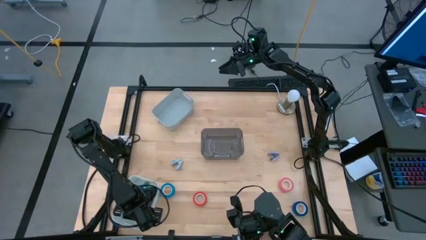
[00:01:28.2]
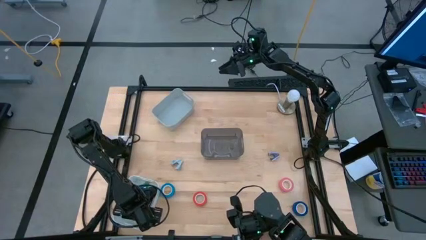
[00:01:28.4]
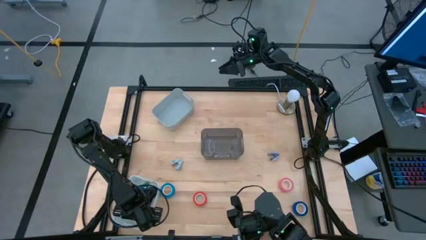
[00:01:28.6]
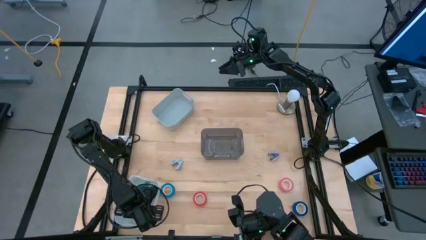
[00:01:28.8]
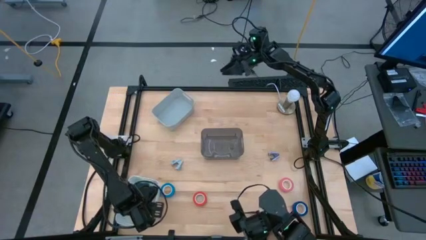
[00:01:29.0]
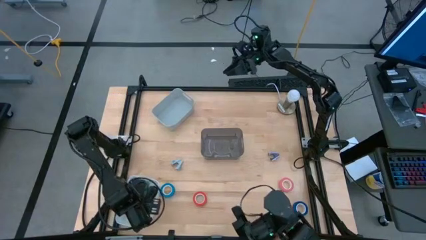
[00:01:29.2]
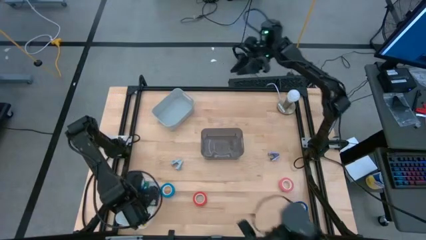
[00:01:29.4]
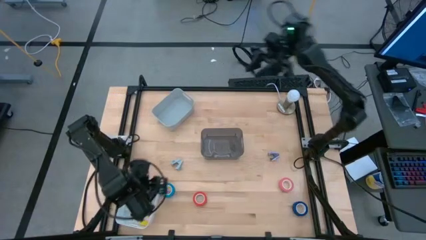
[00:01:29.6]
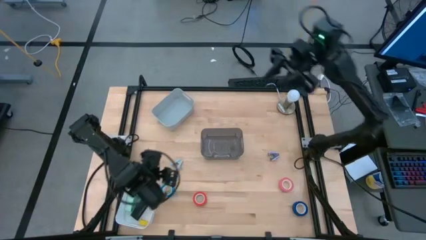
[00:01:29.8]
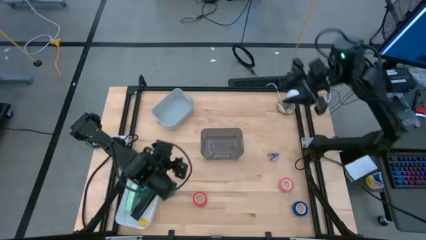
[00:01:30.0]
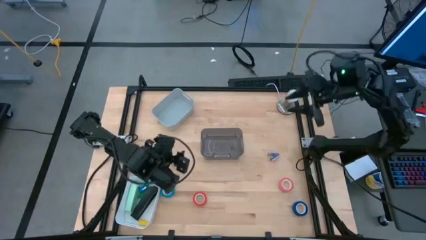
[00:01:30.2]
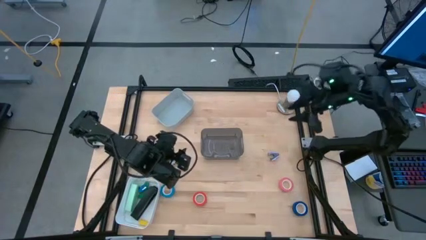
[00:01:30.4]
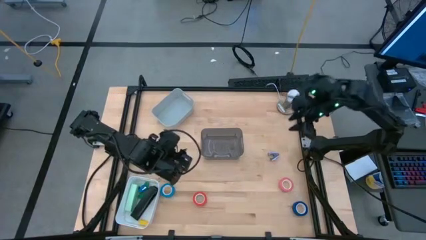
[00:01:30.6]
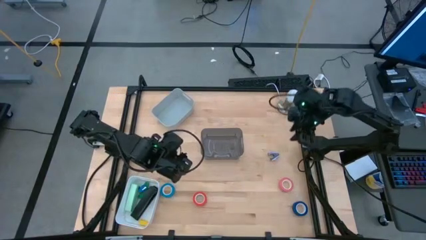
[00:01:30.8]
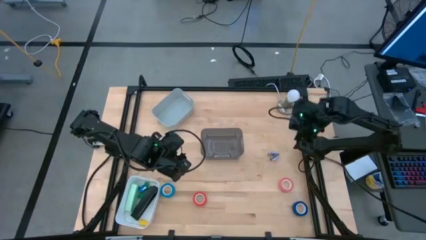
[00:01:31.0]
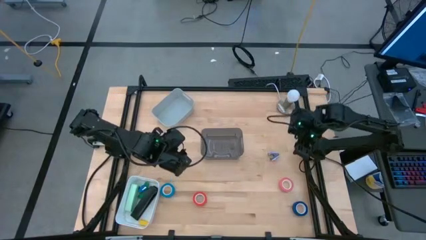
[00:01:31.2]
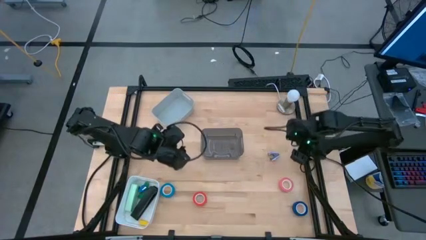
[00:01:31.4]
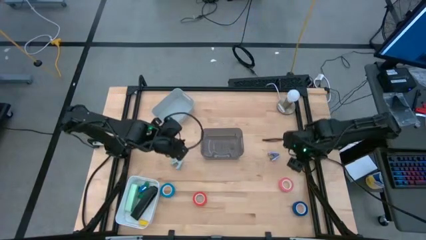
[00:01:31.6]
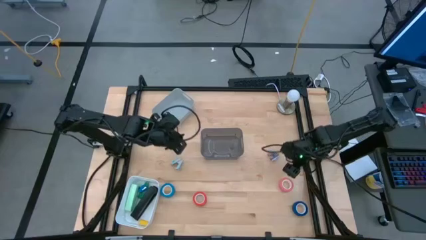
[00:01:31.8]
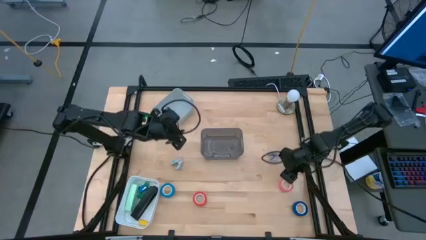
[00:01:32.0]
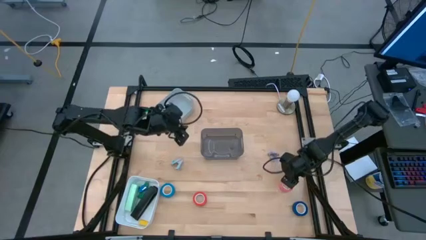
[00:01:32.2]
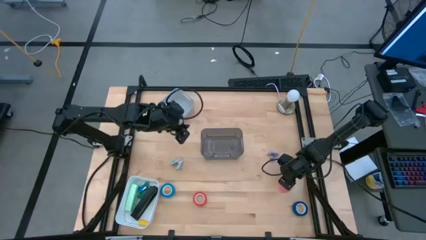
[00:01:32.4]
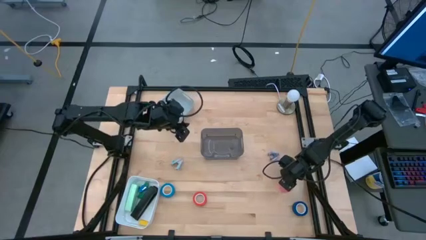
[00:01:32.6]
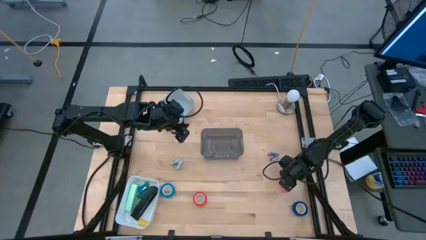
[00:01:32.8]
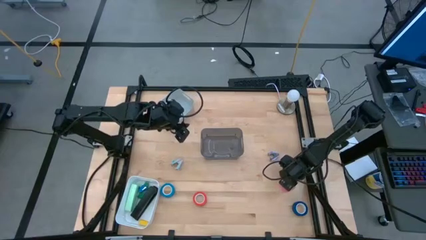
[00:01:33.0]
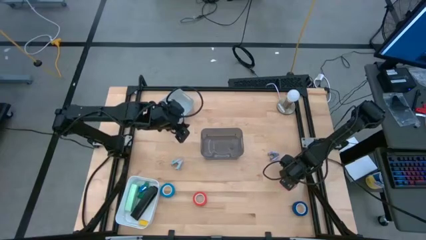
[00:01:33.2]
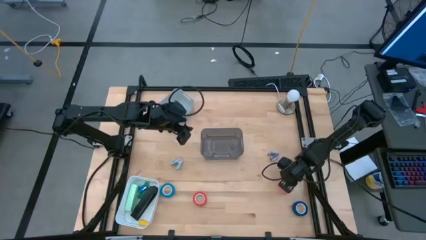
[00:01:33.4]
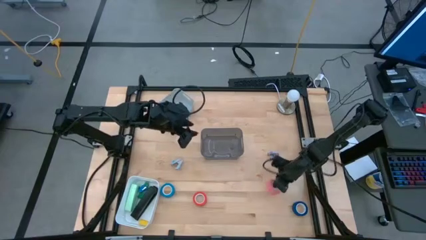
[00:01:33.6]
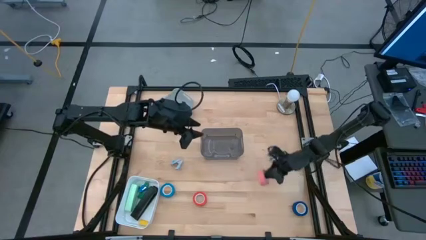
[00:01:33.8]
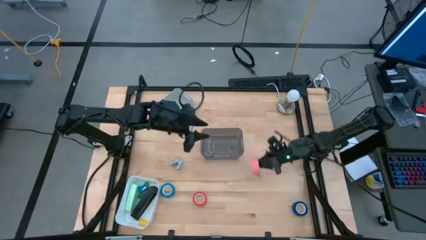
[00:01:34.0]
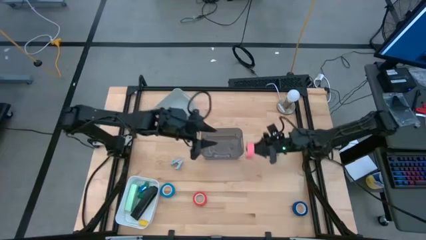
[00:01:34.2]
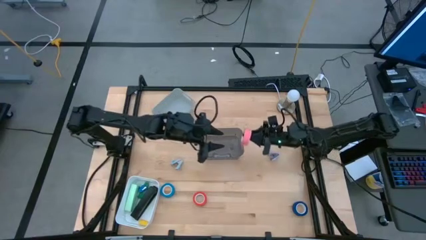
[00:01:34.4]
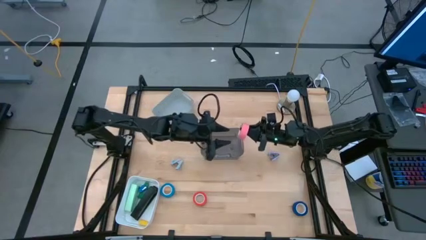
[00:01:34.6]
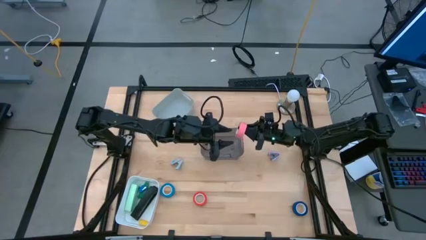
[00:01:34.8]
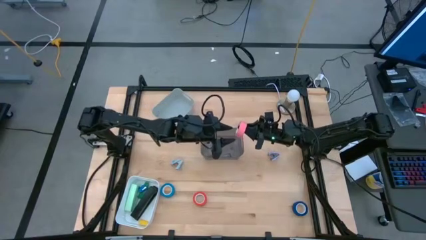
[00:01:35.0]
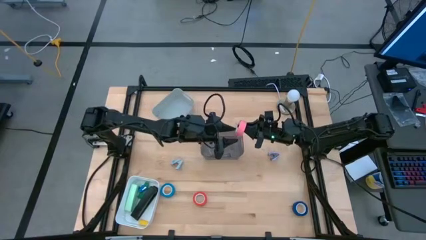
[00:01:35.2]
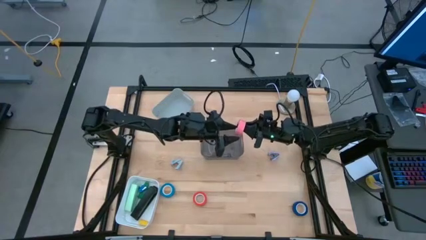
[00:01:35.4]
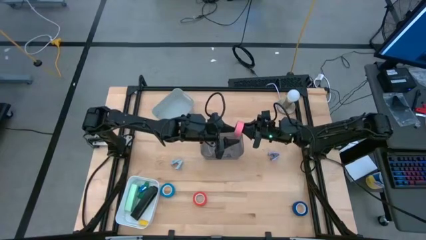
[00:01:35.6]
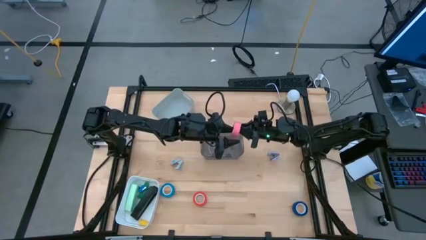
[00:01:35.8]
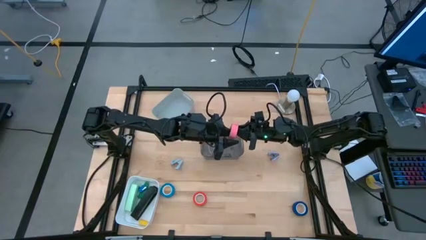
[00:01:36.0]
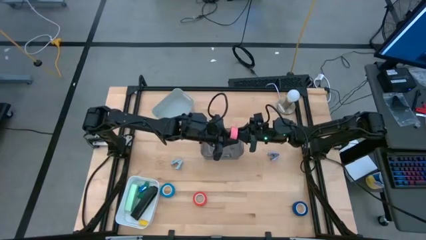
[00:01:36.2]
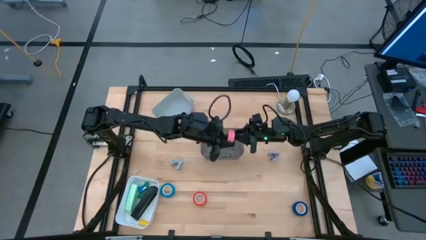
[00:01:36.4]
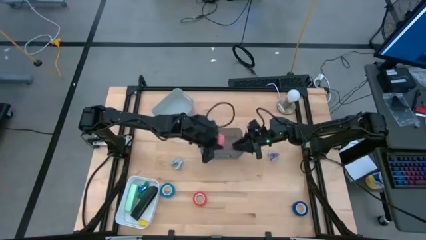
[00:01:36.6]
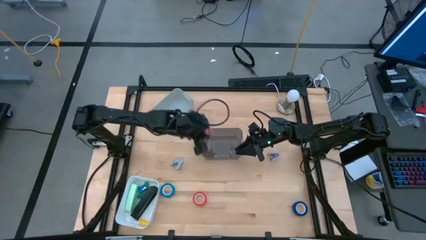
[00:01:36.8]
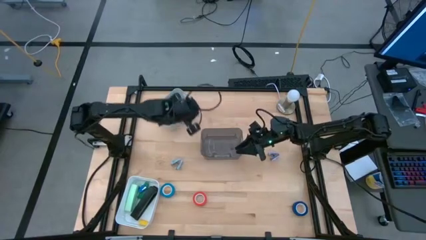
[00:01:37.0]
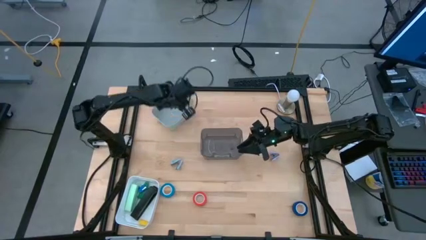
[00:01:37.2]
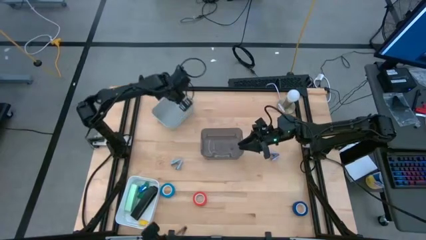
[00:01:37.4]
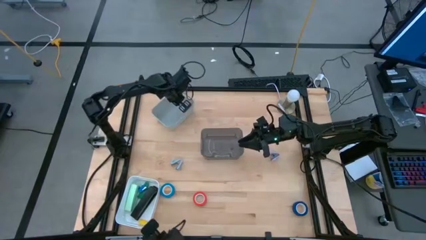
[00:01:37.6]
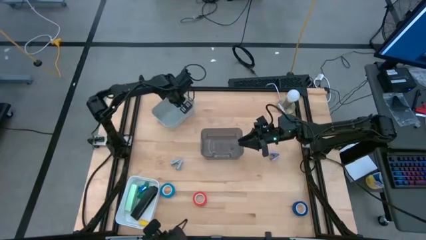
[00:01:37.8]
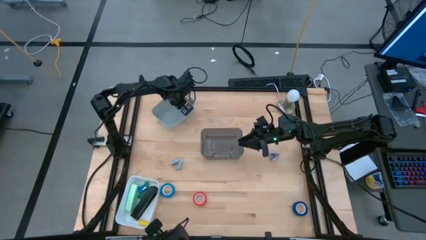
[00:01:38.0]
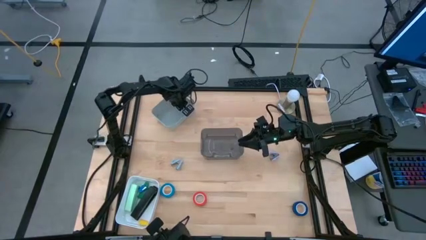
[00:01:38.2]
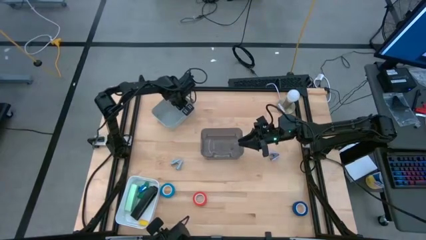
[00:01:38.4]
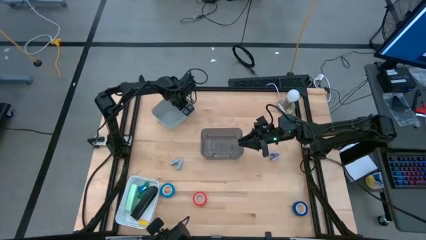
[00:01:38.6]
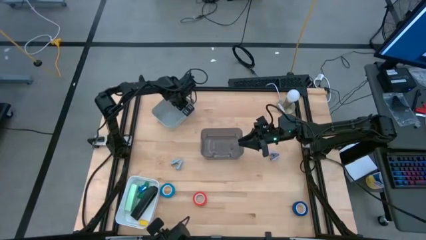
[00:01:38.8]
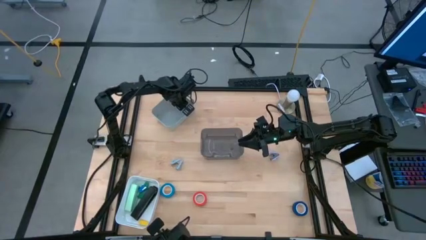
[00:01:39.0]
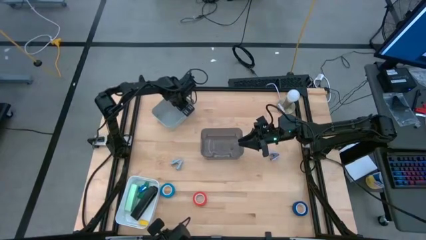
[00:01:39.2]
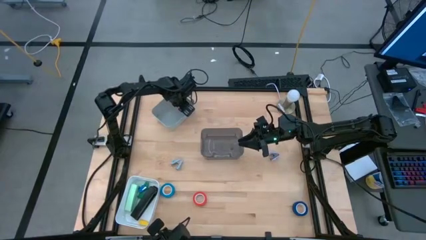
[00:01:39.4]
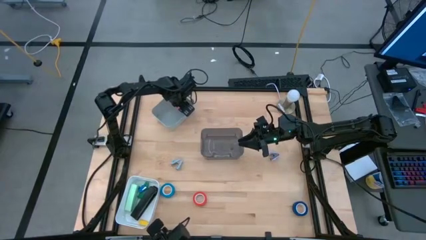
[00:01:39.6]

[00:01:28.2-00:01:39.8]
Task: Pick and place Stapler, Stapler remover, tape
Put the pink tape into the grey bin

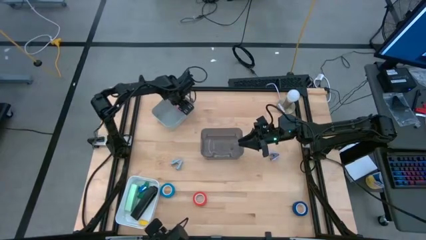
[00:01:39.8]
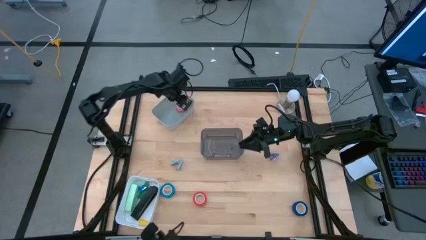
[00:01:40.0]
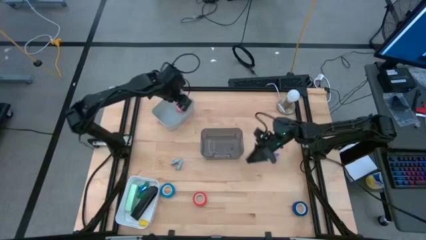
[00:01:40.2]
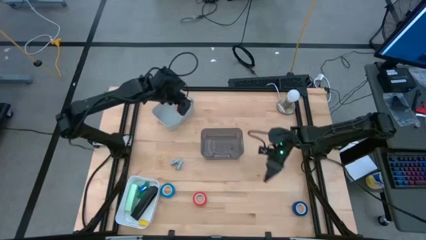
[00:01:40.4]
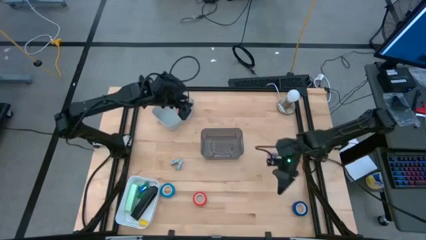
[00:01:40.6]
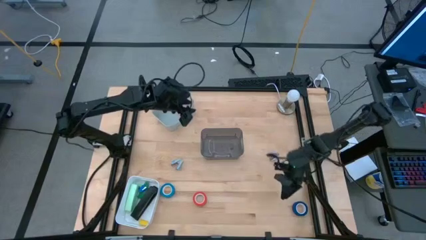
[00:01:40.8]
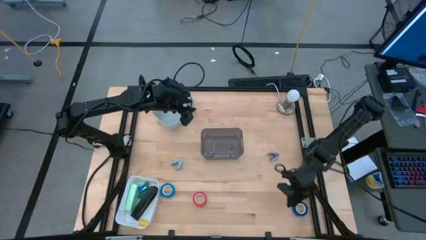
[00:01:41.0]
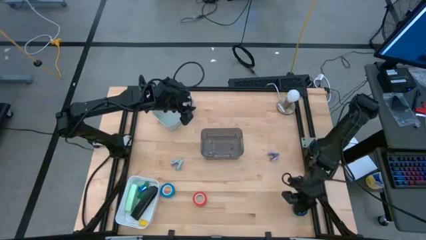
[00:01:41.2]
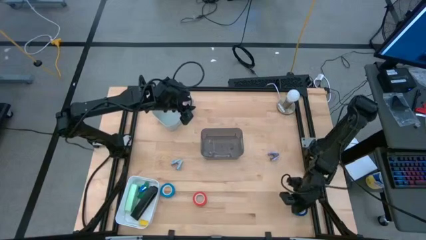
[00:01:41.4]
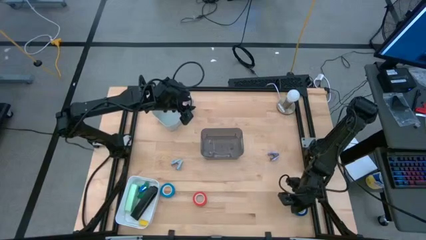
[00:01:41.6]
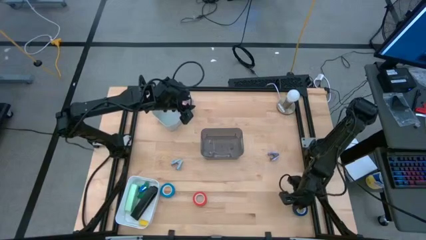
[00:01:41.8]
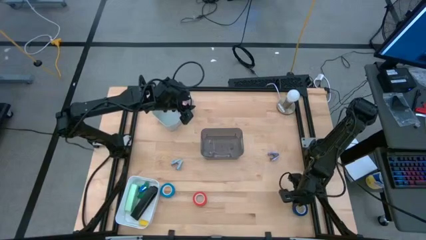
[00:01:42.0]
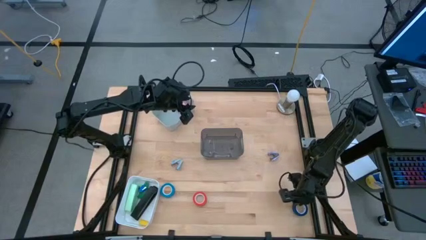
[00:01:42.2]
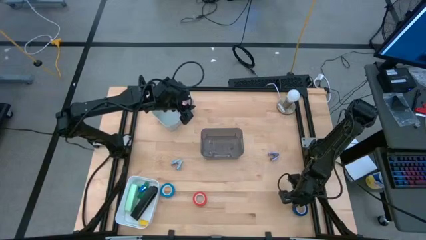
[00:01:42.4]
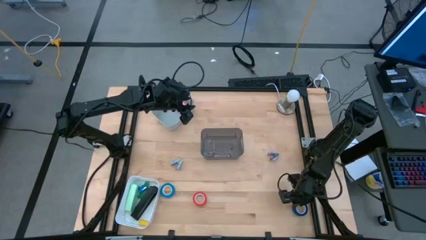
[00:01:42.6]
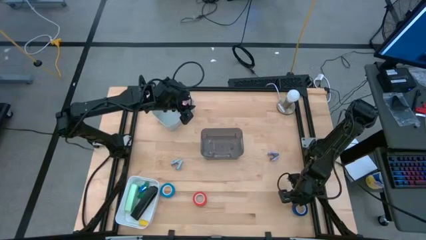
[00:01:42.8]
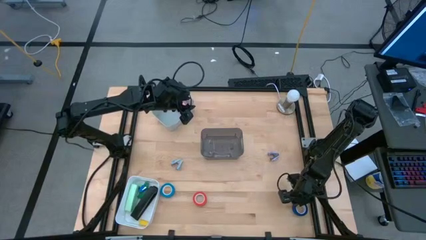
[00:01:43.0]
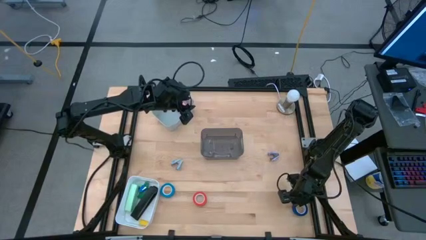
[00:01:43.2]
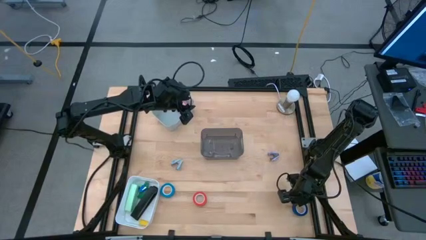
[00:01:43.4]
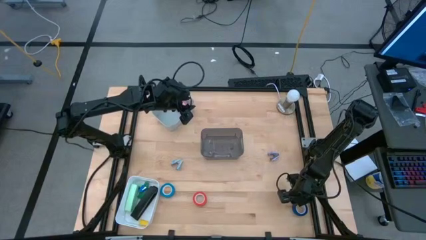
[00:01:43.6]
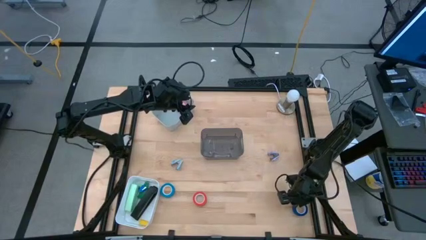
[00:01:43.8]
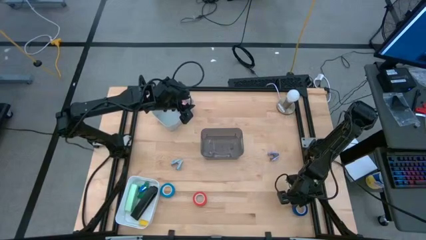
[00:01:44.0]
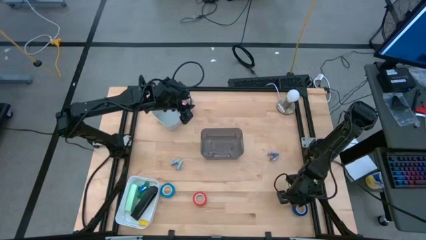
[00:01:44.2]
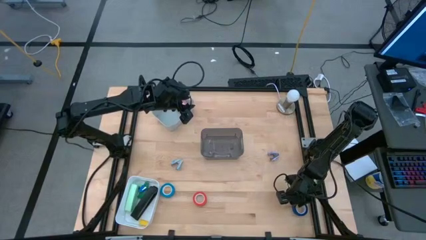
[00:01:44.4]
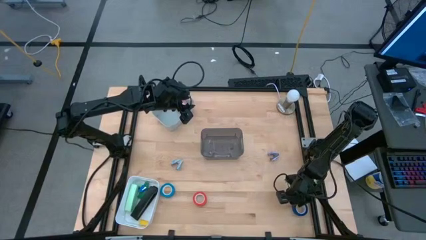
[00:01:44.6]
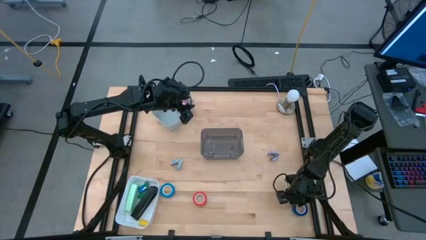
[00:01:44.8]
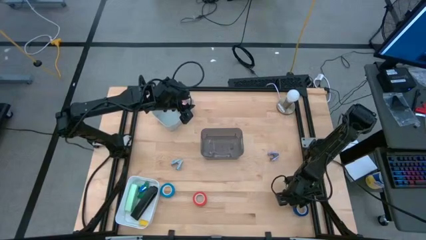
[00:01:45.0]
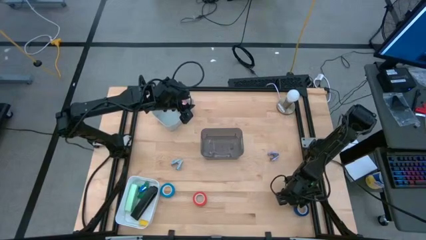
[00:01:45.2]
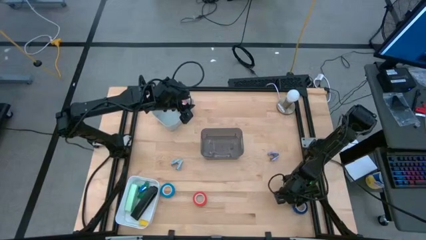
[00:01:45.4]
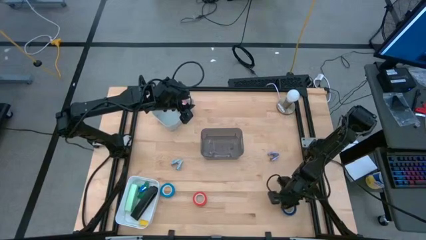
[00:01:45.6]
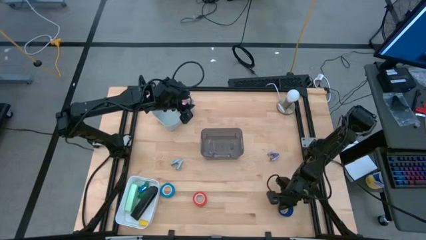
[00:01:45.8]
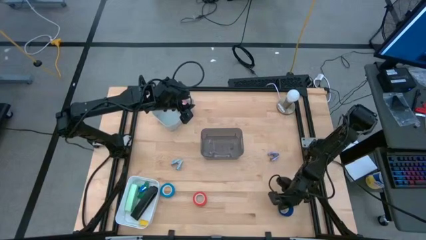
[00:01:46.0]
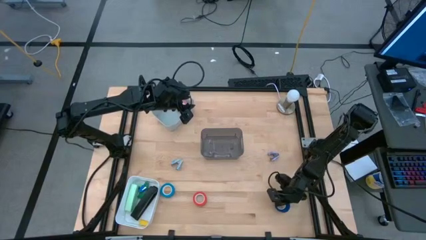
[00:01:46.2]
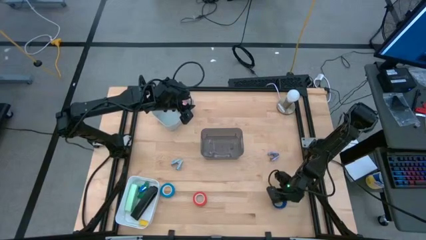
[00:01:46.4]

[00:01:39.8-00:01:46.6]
Put the blue tape into the grey bin
